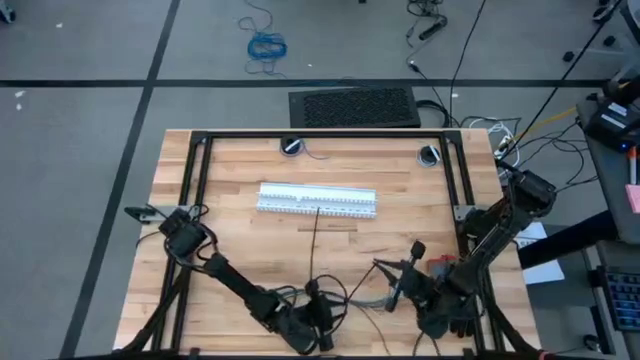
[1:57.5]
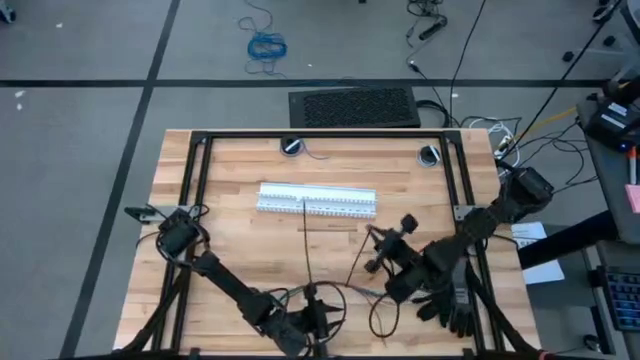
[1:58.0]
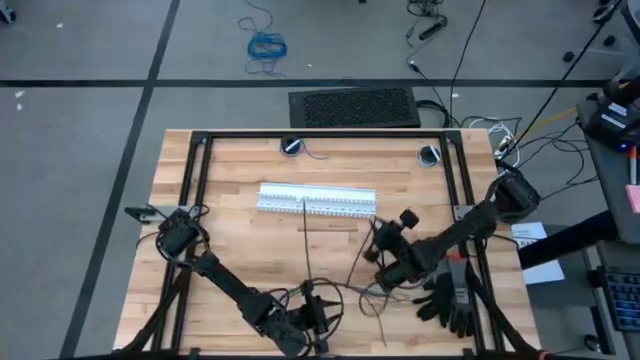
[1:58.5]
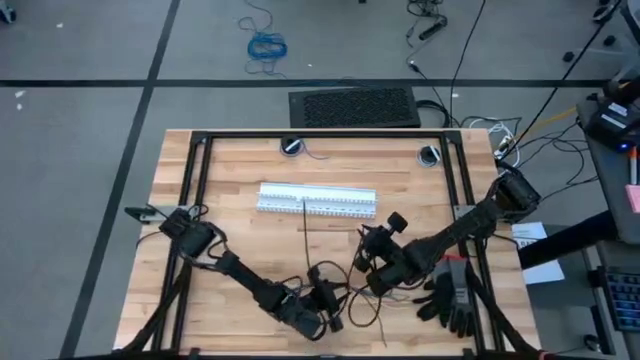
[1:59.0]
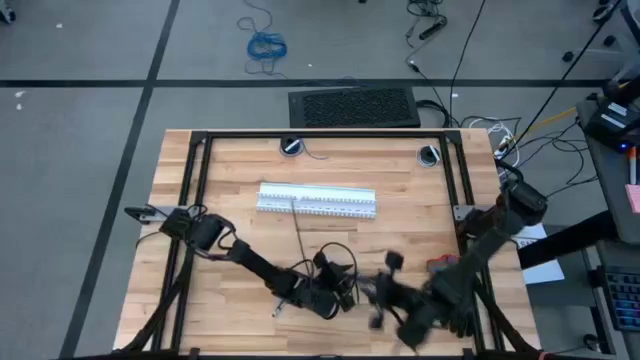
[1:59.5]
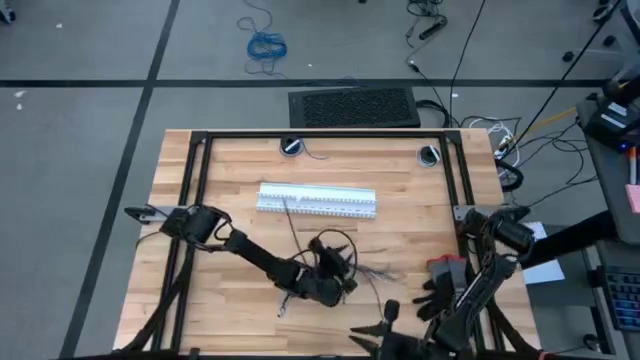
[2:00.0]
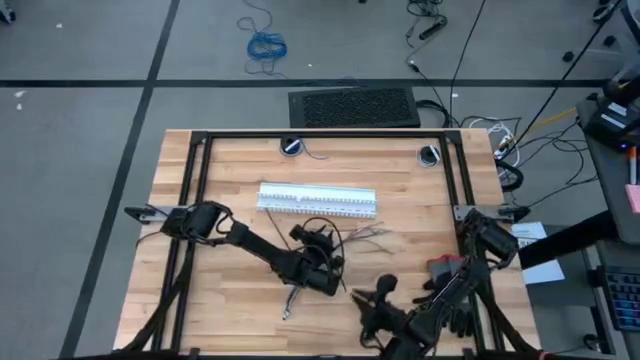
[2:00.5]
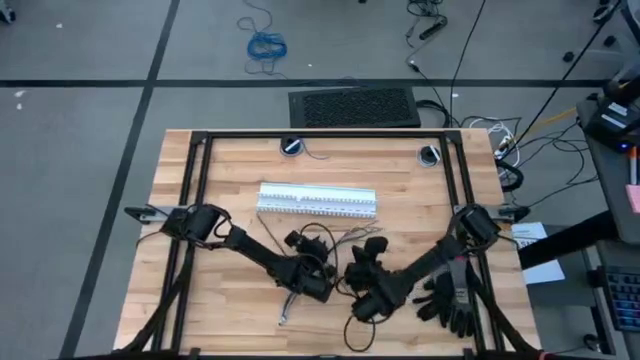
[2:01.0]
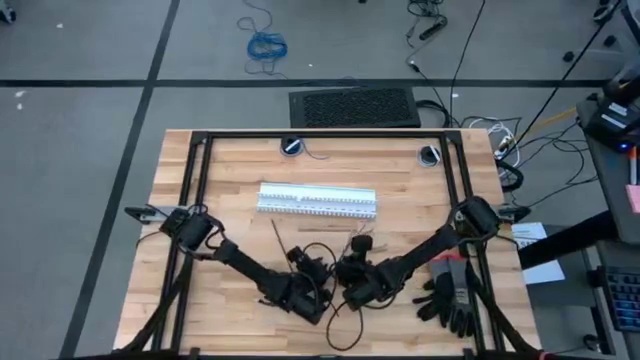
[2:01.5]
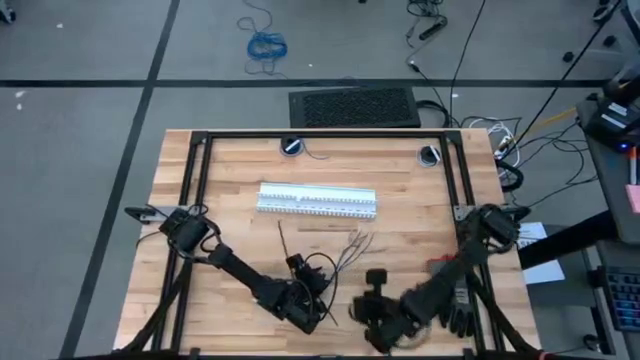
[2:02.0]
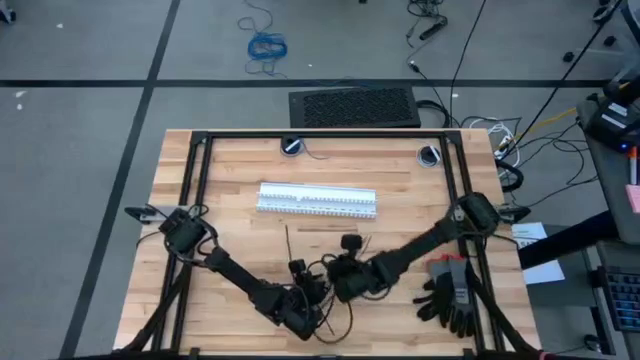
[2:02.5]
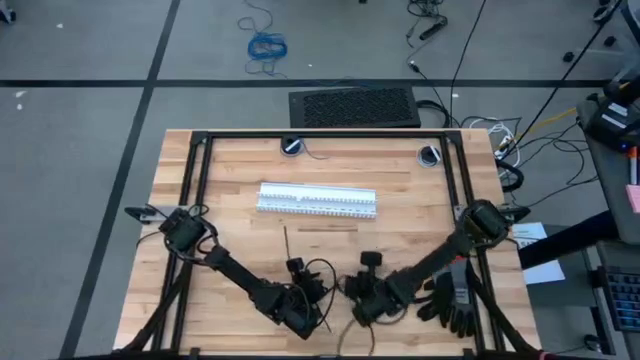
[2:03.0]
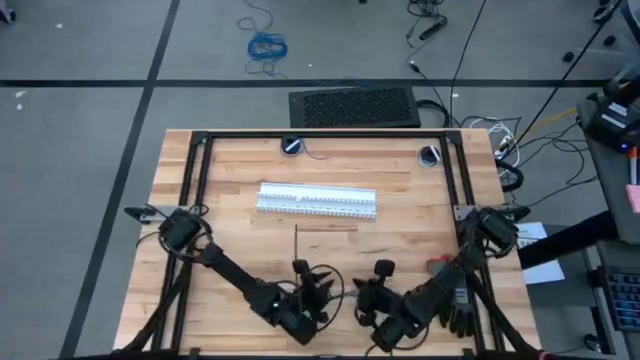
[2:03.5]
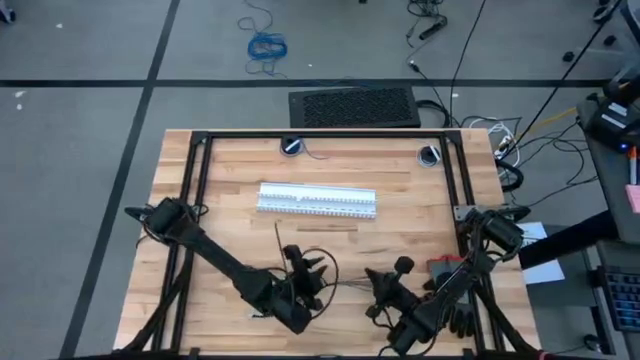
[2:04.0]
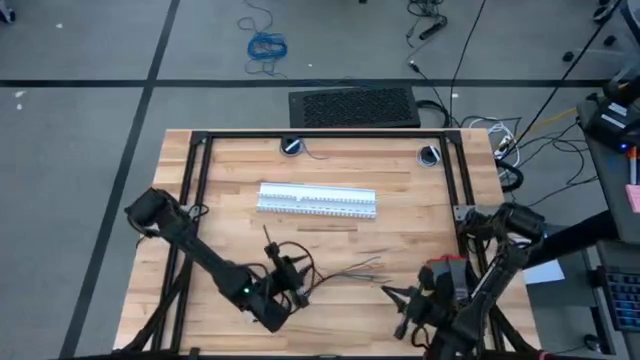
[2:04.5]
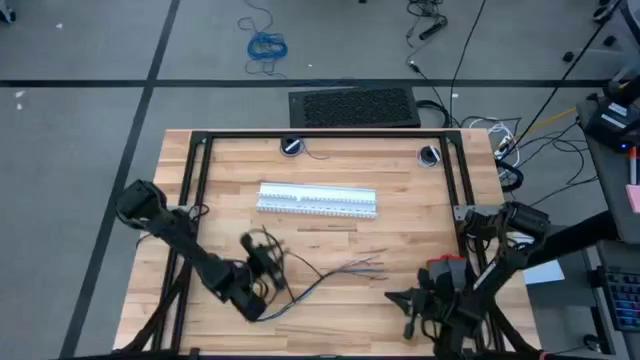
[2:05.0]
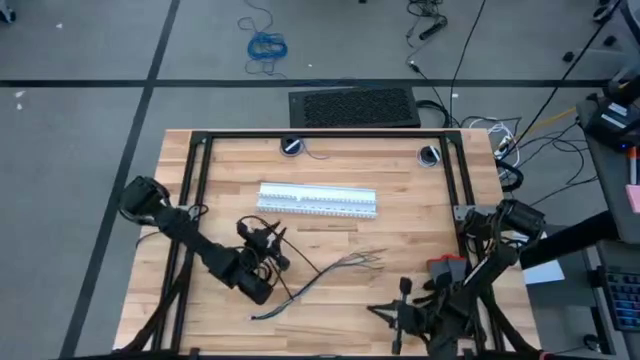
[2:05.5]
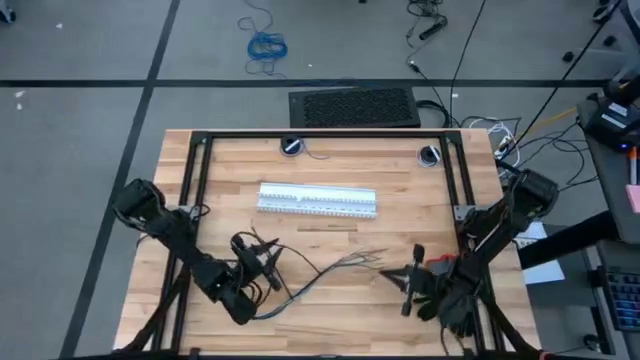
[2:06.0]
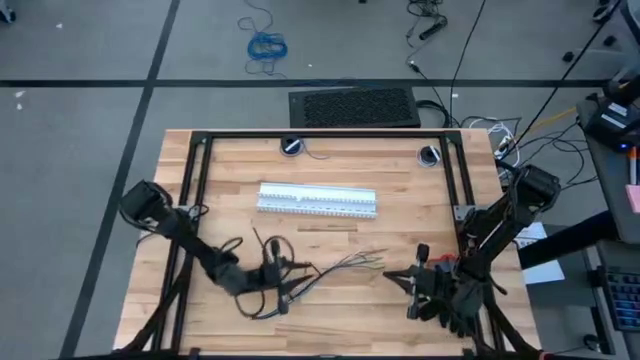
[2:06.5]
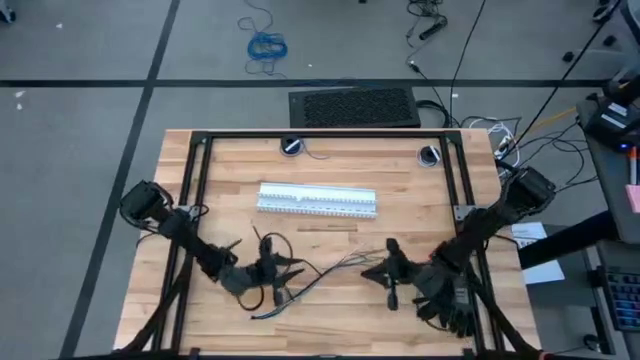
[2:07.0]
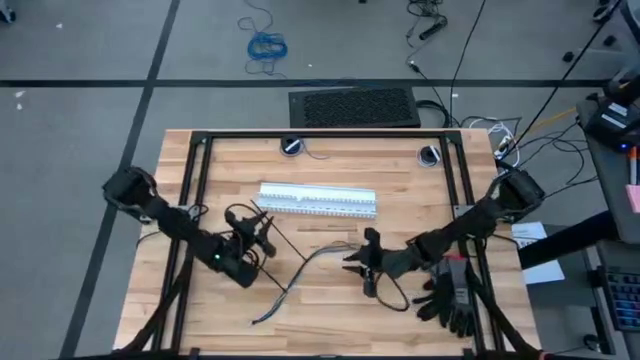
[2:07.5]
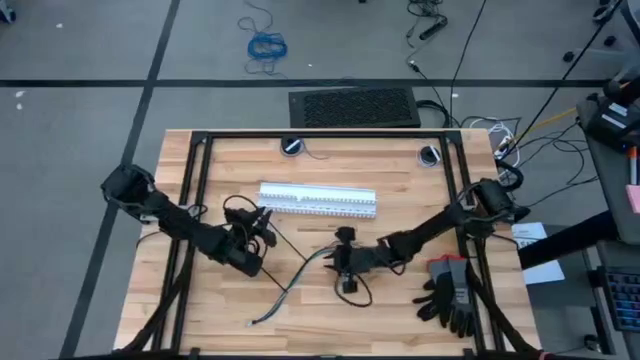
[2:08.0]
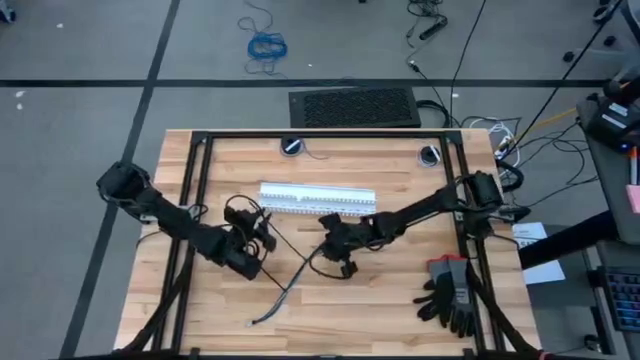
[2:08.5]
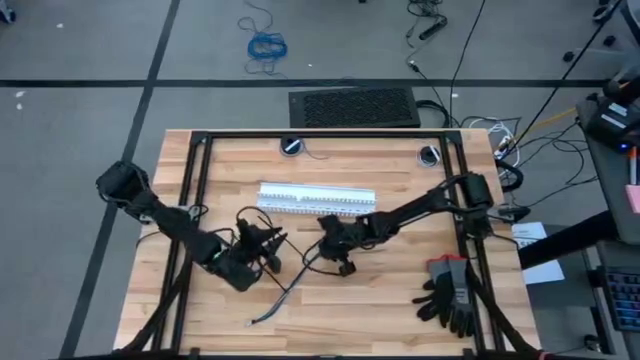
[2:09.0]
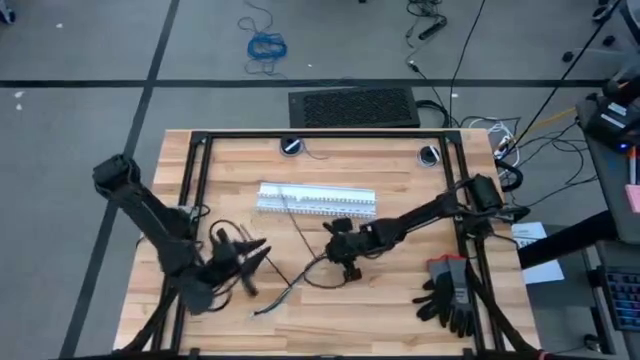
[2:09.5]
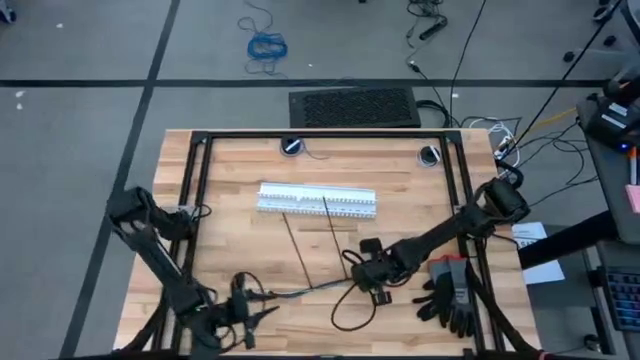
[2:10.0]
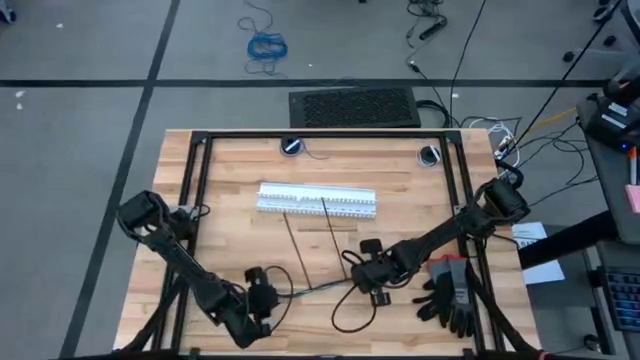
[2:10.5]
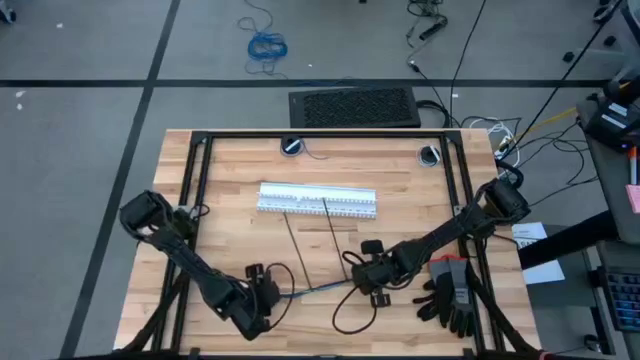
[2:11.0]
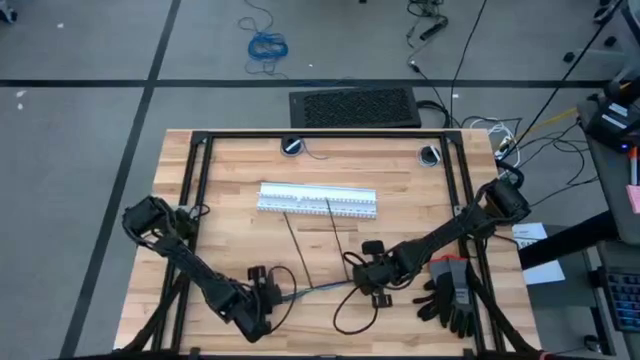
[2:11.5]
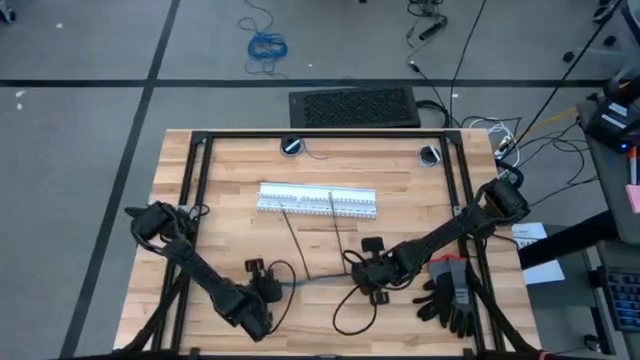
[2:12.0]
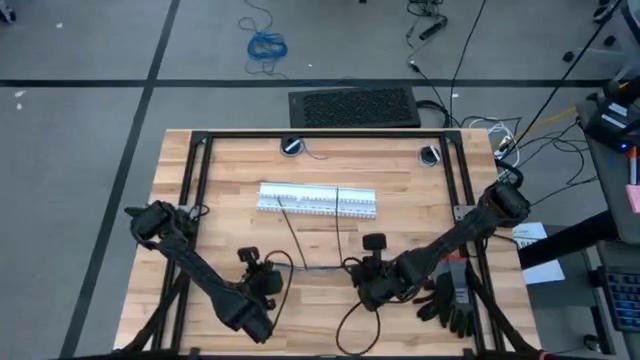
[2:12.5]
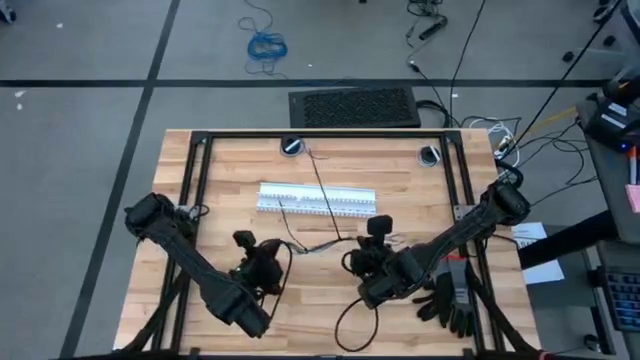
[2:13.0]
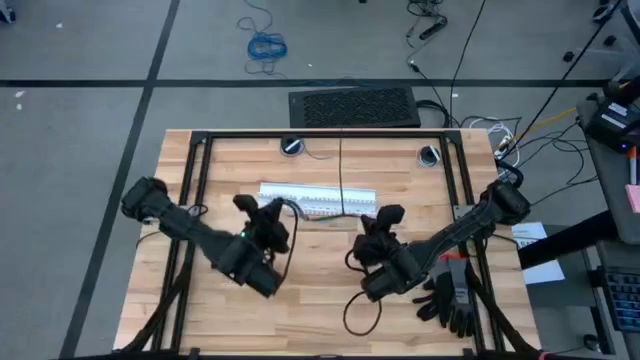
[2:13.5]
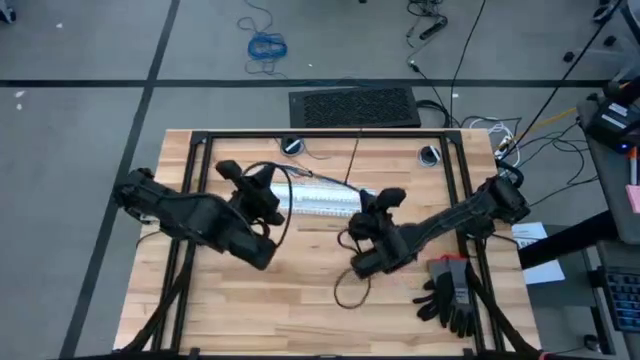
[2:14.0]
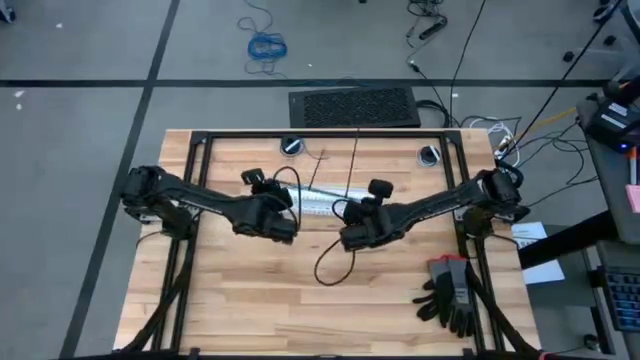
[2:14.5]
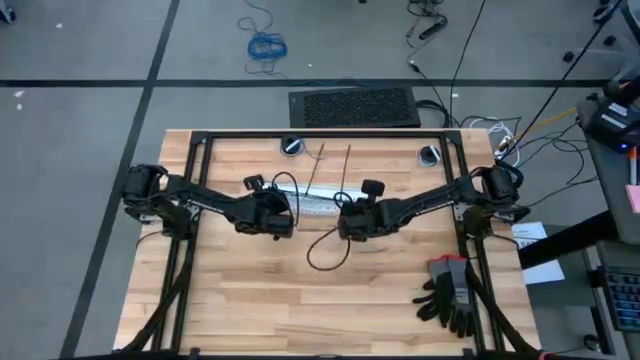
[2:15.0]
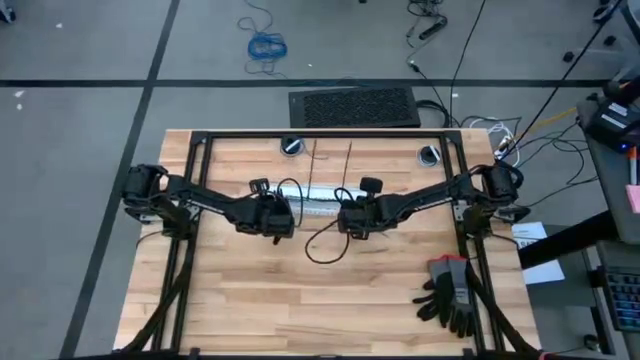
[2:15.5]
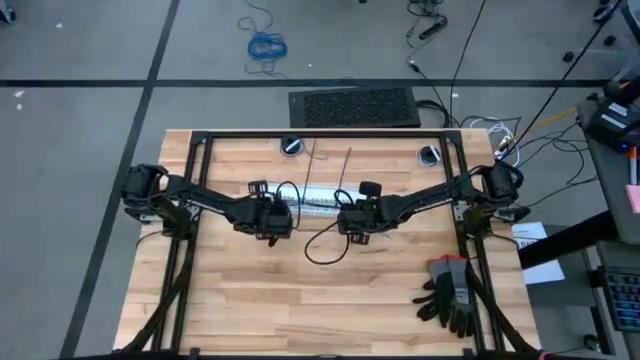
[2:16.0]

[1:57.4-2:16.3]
Task: Ziptie cables
Put the ziptied cables into the cable duct

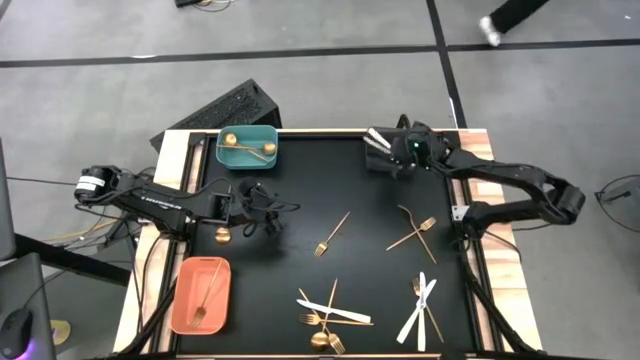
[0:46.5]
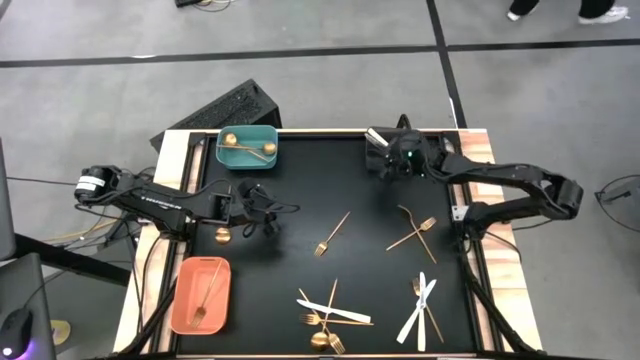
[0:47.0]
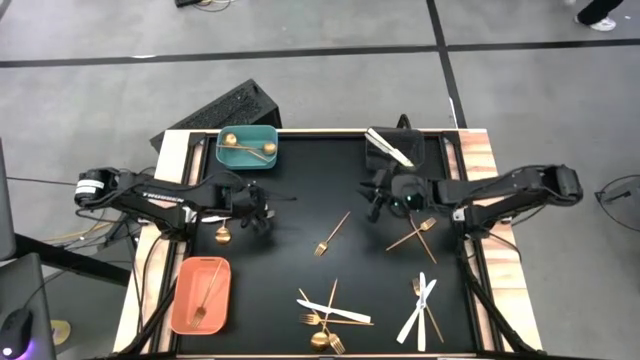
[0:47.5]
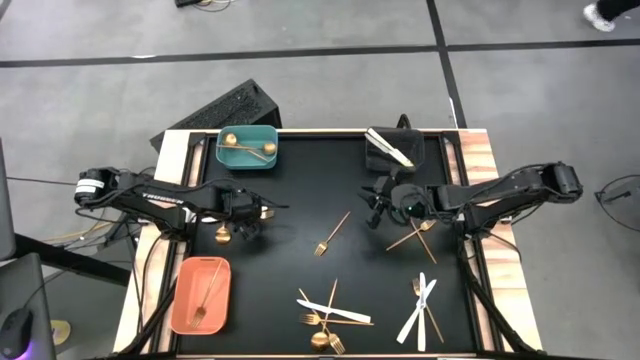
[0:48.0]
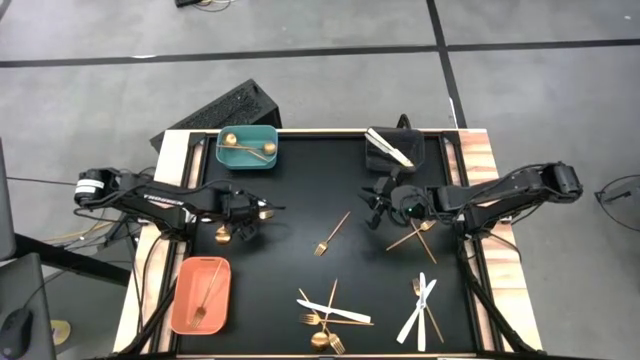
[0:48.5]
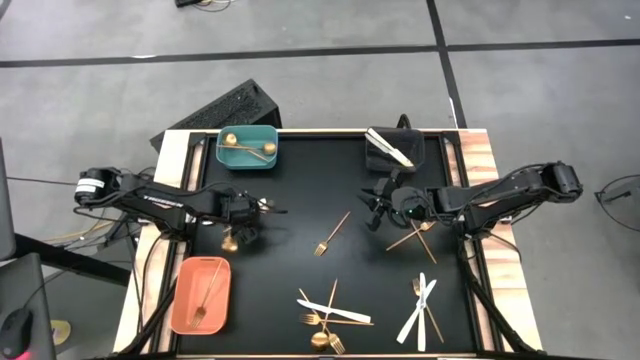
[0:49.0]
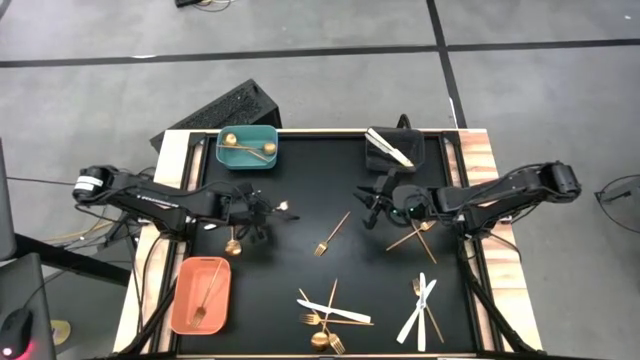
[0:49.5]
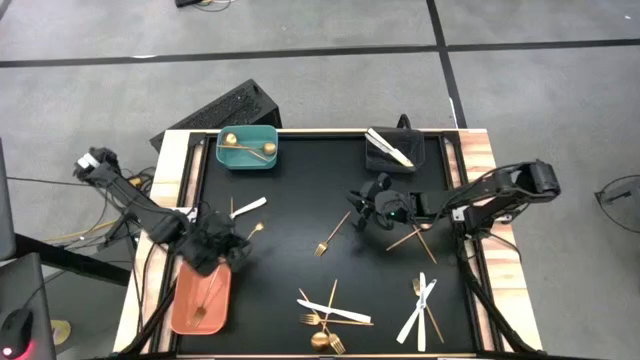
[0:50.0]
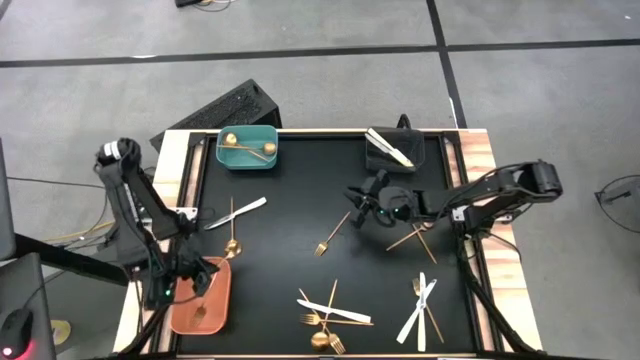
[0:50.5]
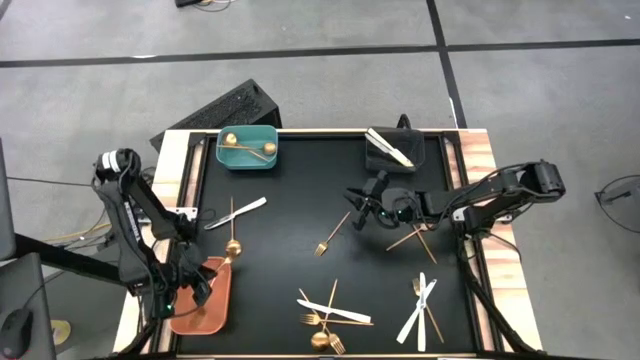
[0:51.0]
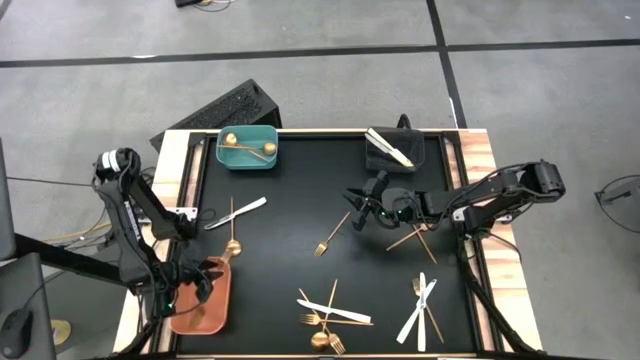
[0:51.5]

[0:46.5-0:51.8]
Task: Sort silverware by color (type)
Put the gold fork into the orange bin
